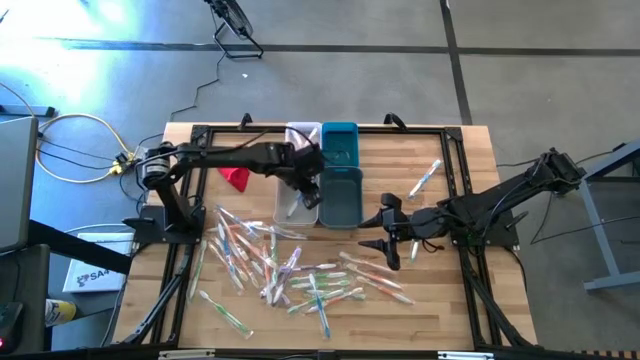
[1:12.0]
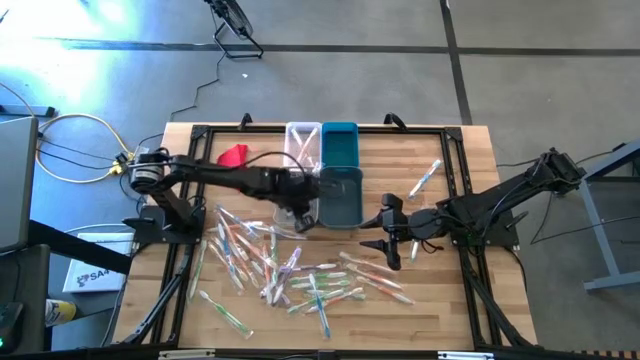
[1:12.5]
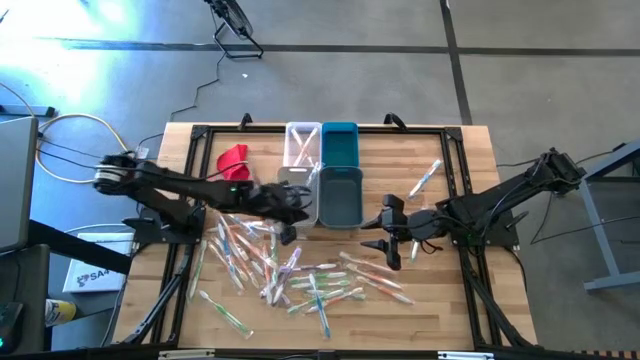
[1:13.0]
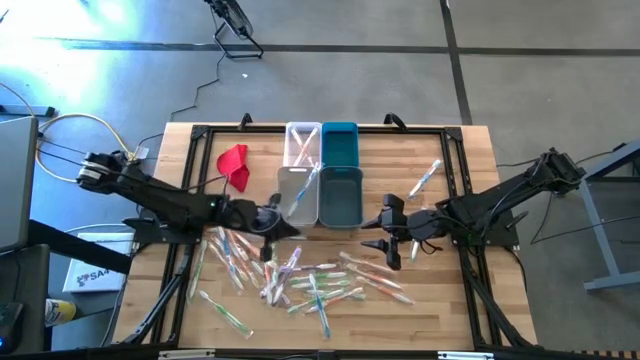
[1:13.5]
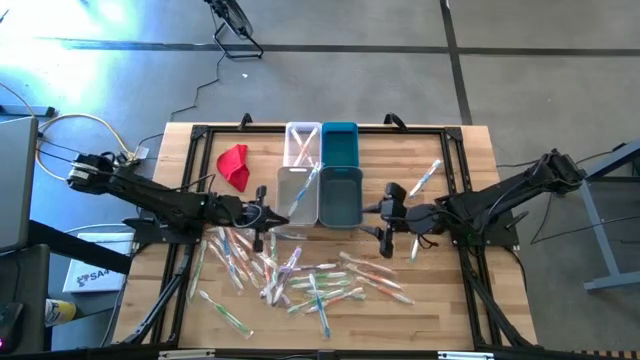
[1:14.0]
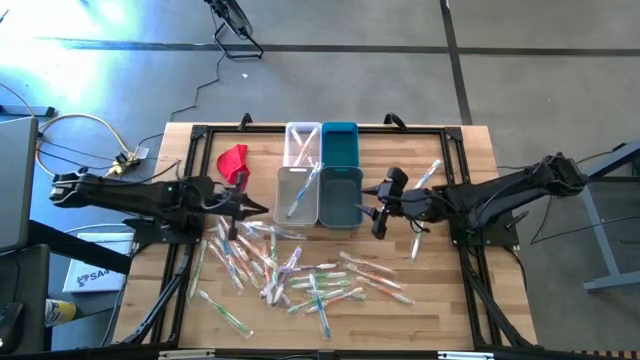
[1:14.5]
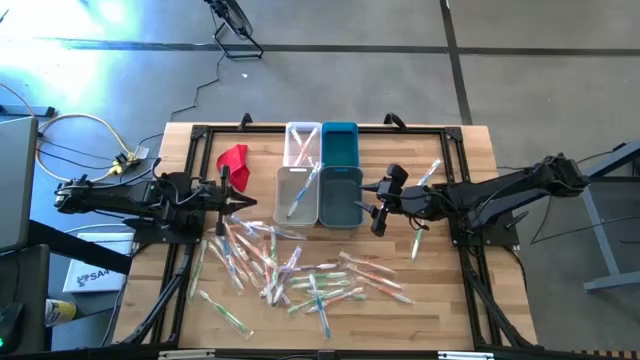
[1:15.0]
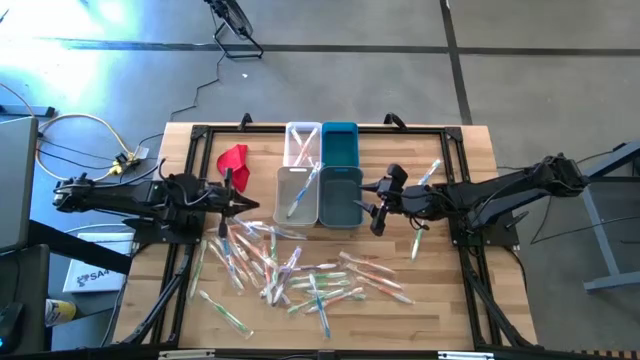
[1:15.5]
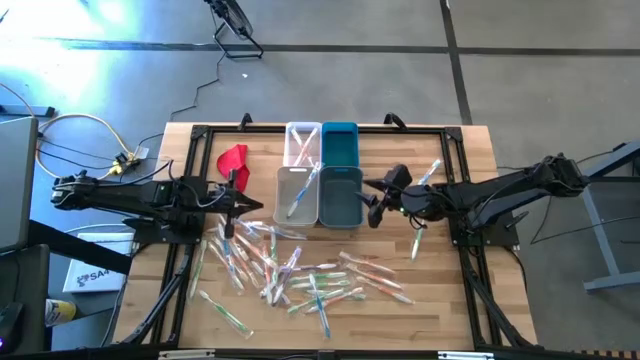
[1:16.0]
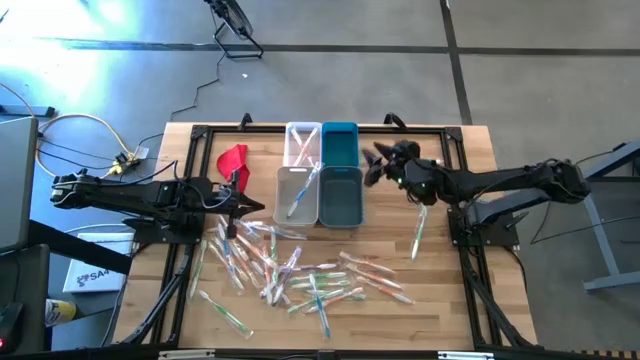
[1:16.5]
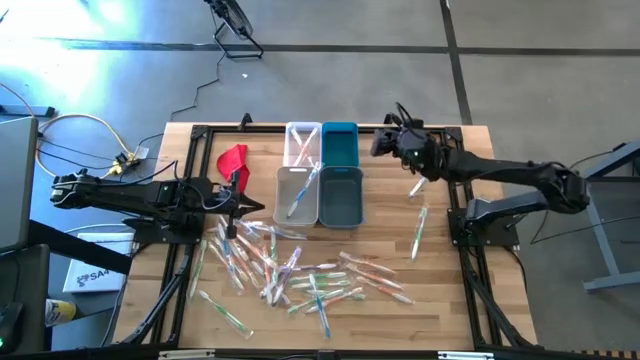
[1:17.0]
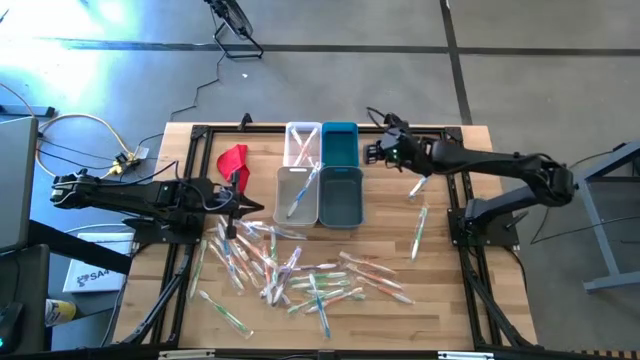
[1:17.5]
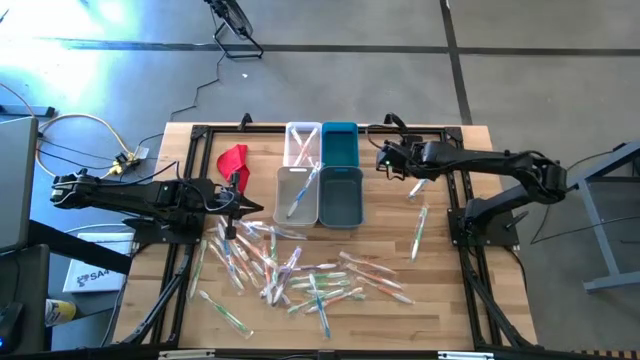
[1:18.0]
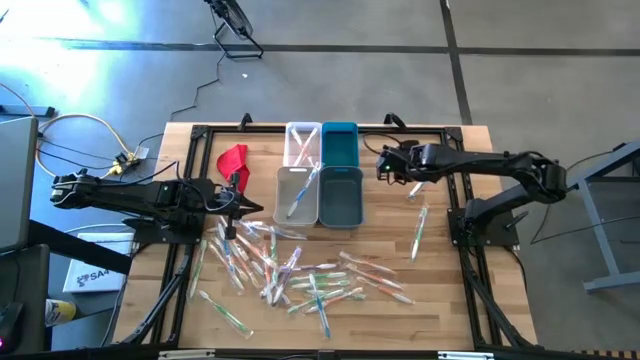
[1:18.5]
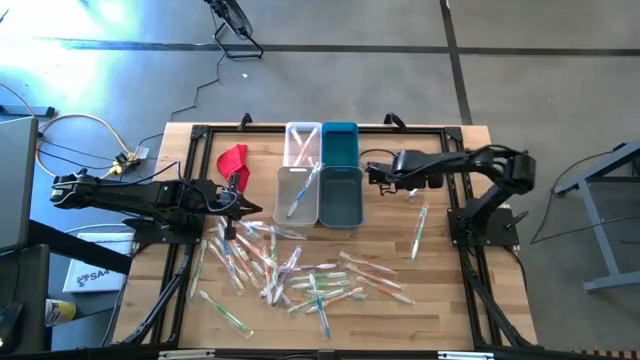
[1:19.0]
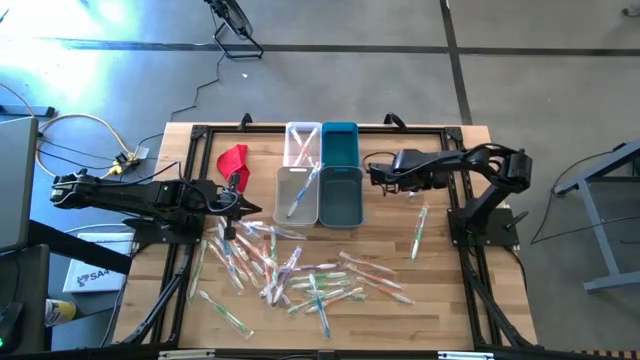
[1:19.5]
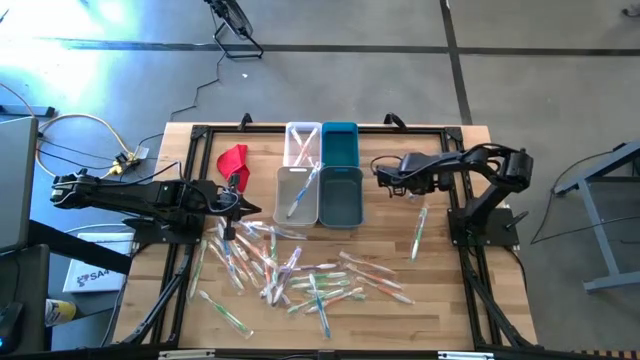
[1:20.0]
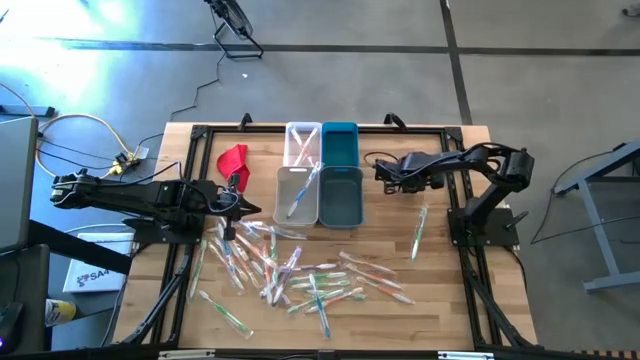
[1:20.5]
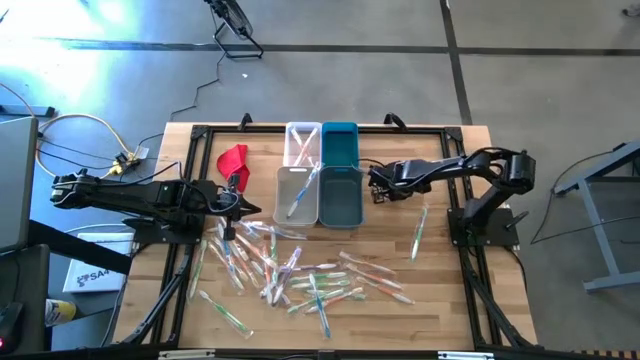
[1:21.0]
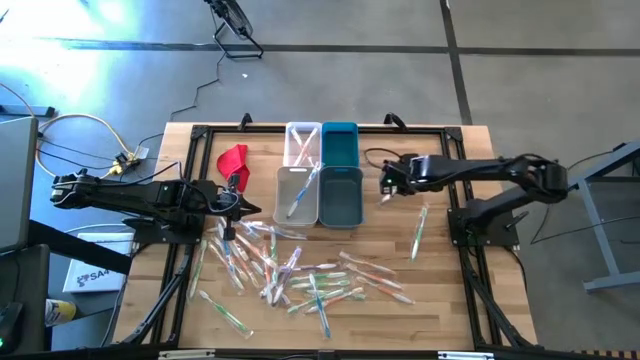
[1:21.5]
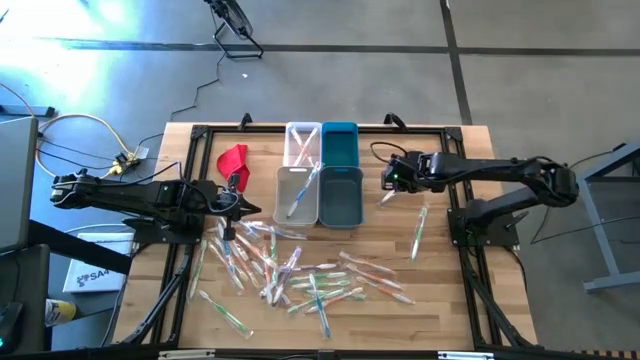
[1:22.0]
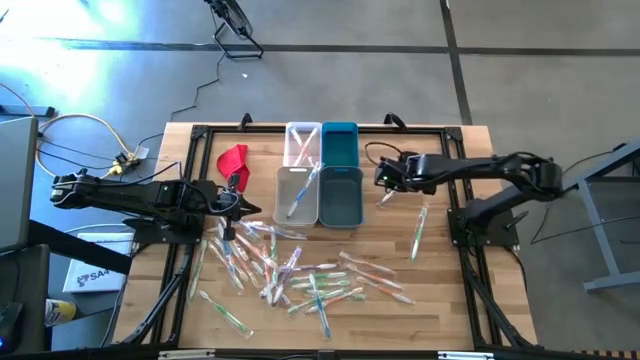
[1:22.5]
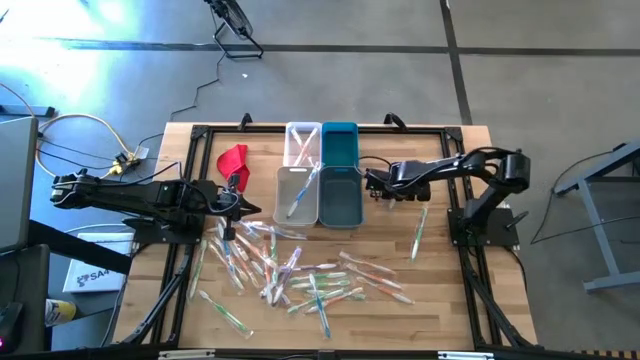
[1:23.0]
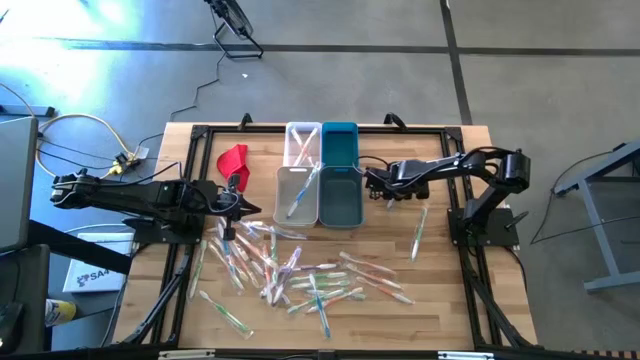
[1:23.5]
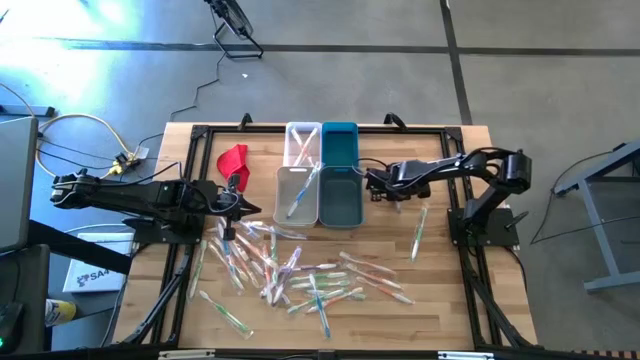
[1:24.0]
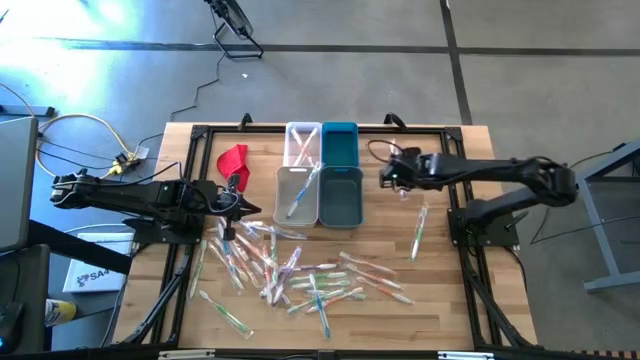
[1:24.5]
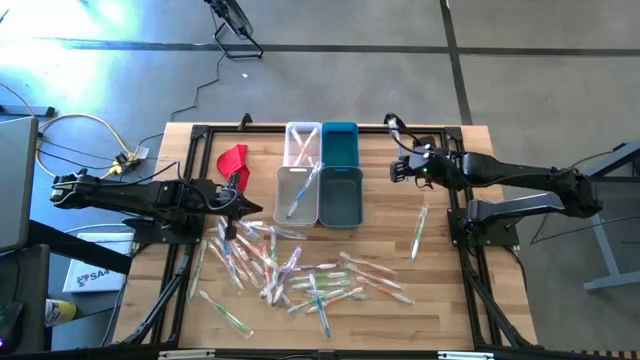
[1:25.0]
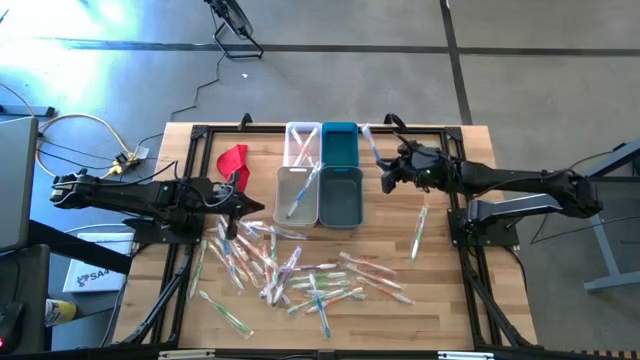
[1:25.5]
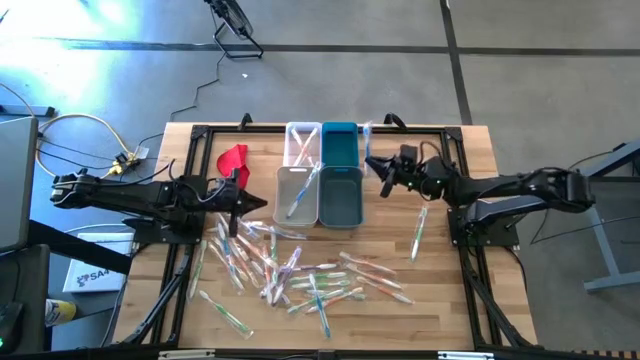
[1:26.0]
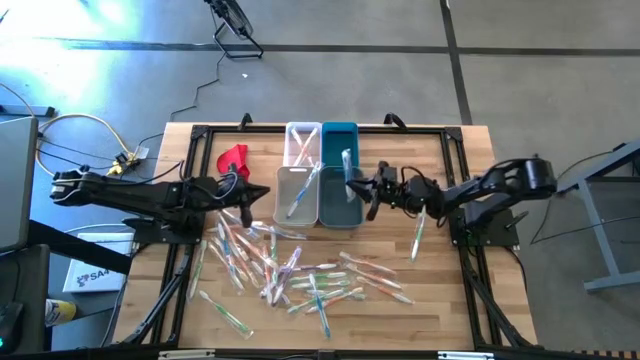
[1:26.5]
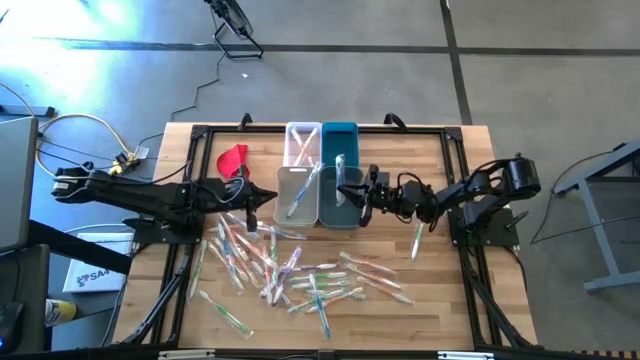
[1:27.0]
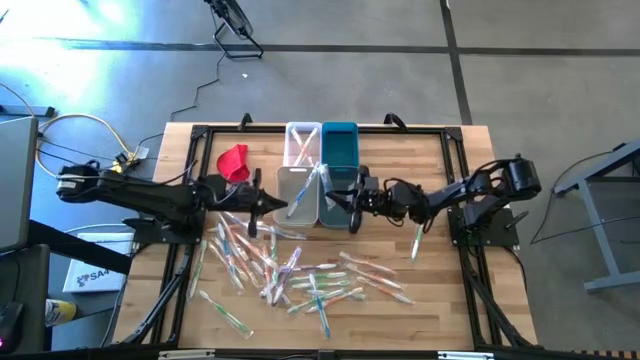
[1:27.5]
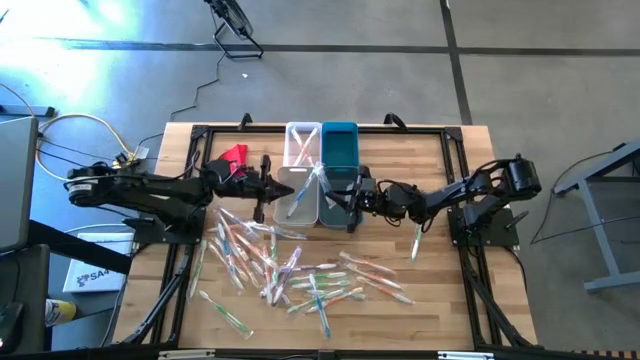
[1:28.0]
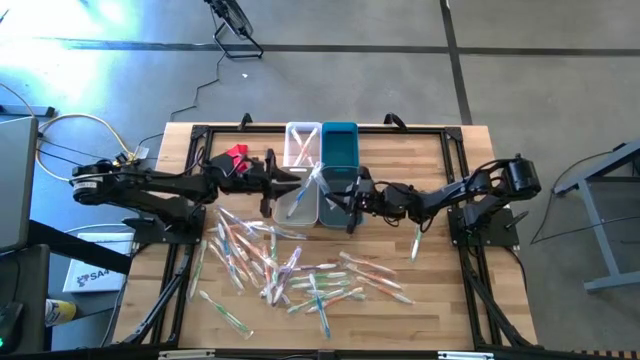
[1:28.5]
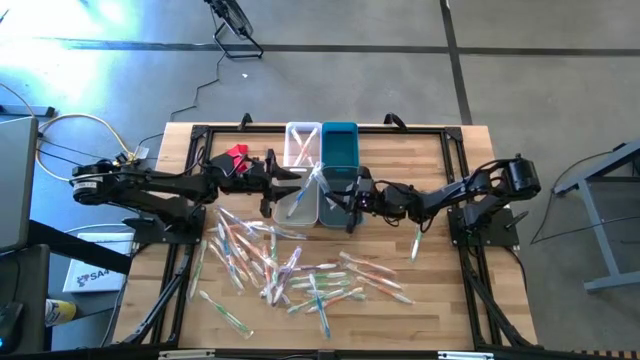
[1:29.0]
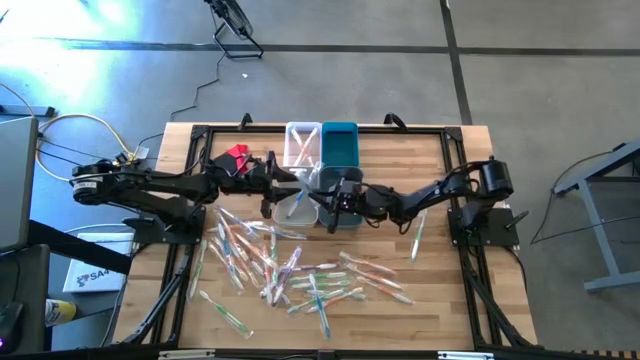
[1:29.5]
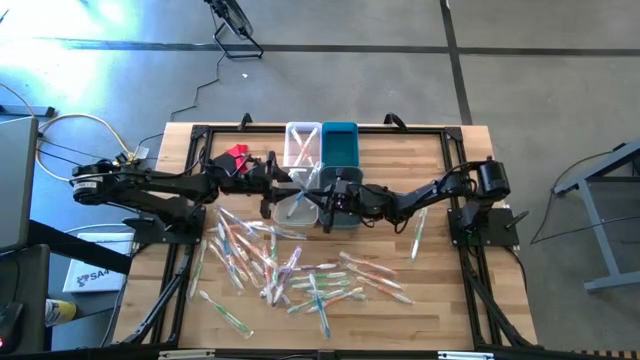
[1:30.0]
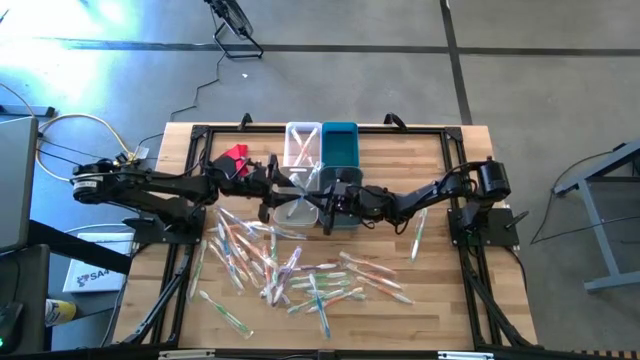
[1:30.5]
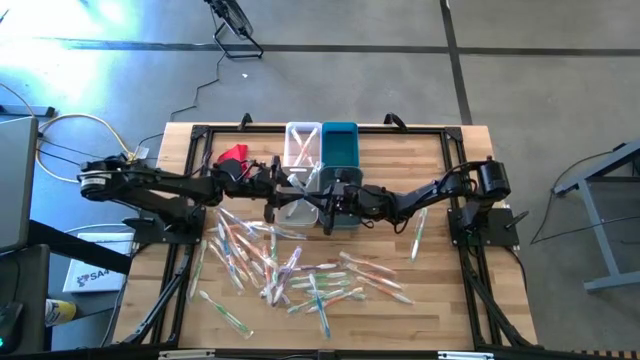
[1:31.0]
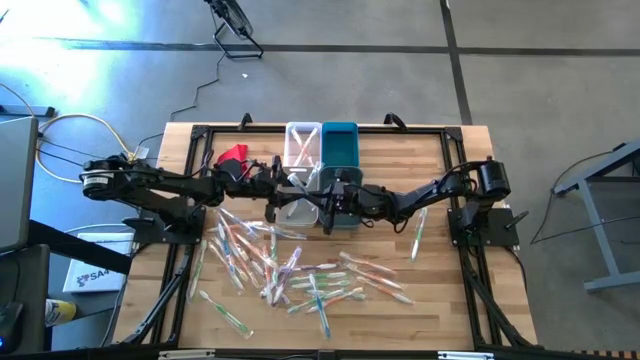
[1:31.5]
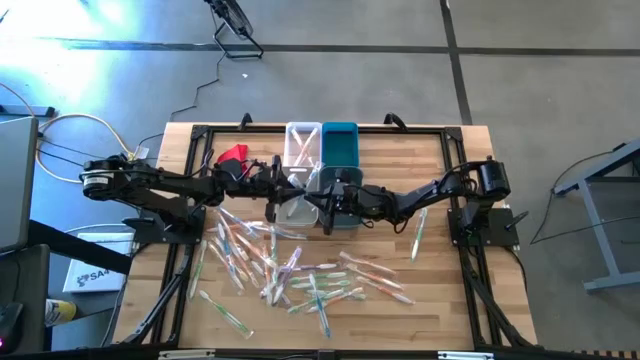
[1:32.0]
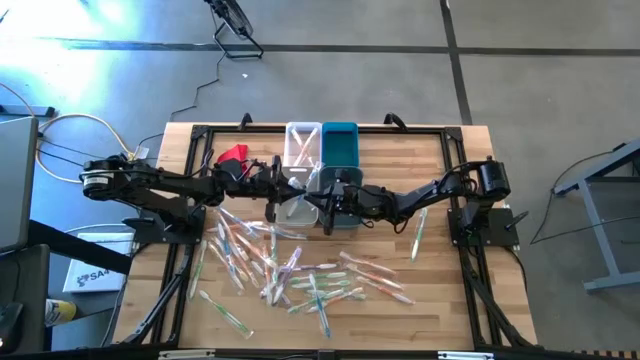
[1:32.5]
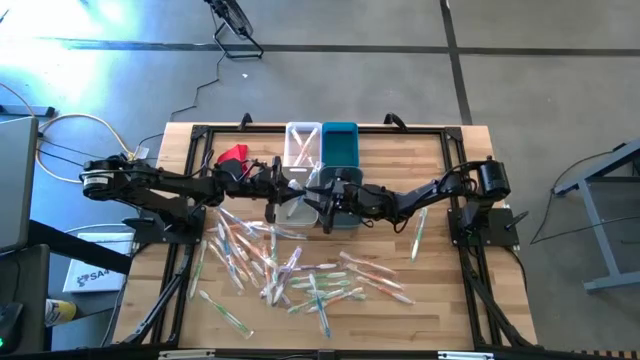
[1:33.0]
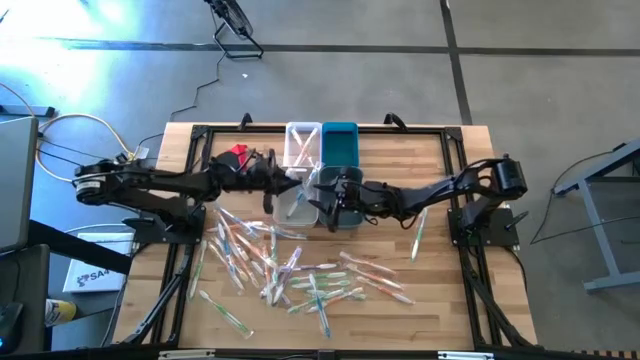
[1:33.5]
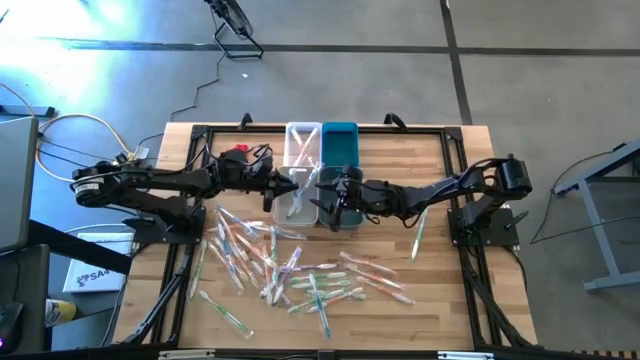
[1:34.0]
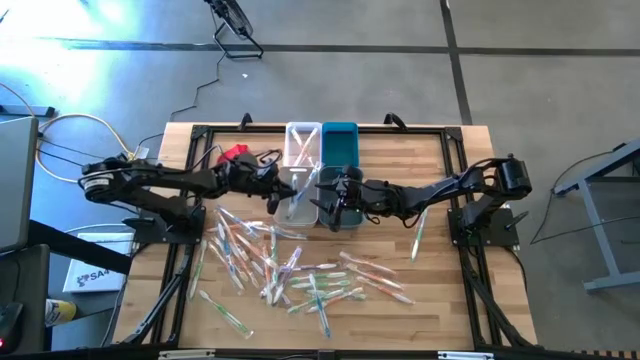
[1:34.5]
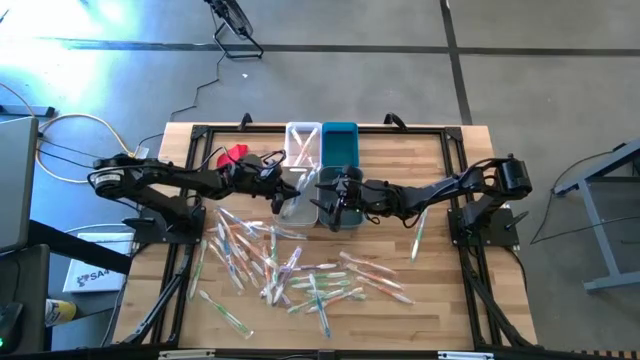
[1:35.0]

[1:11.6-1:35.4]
Task: Pick & Place Toothbrushes
Put the blue toothbrush into the gray bin
